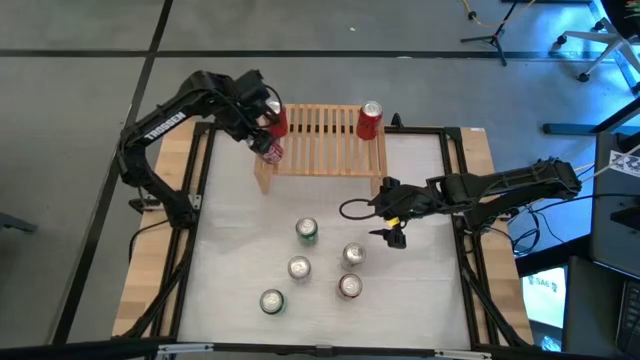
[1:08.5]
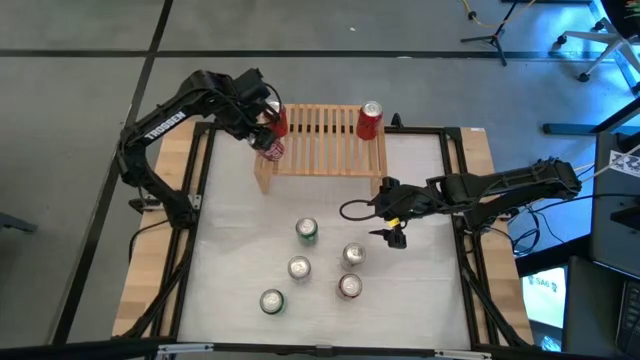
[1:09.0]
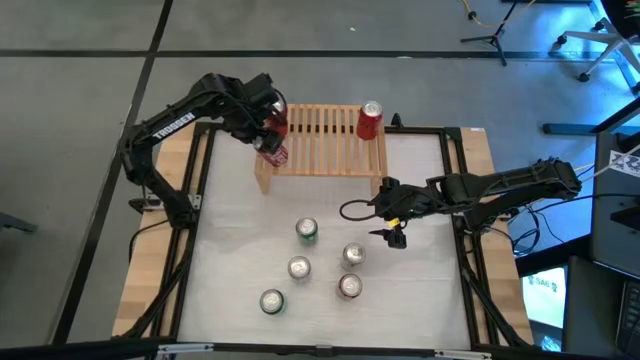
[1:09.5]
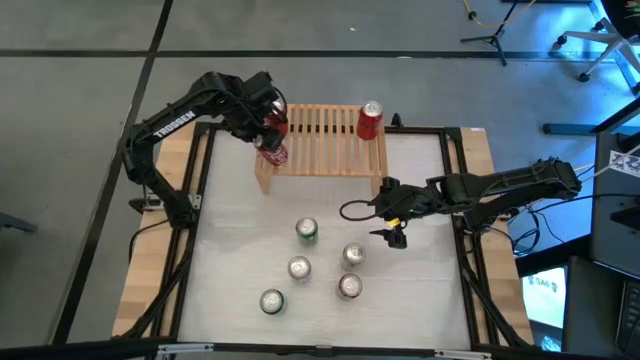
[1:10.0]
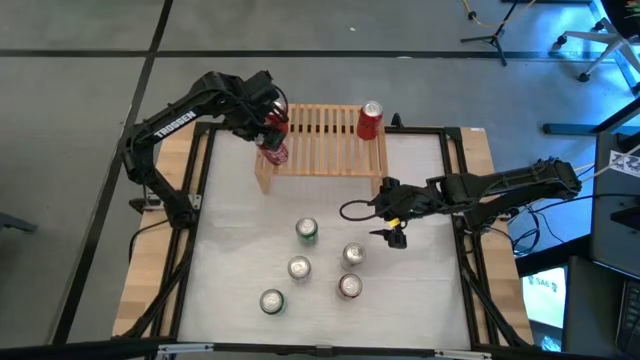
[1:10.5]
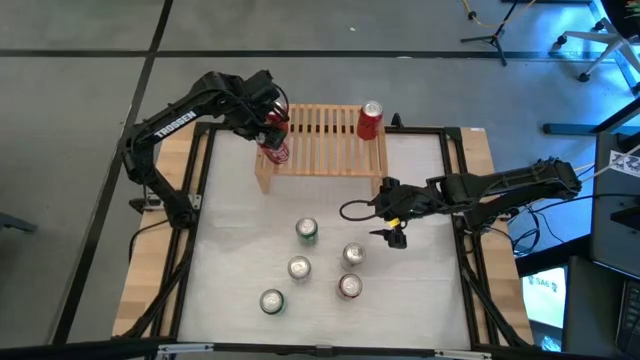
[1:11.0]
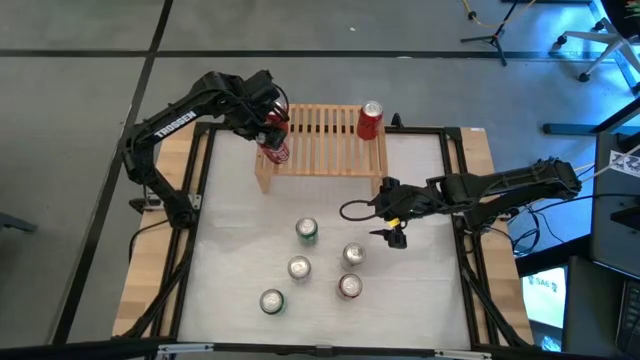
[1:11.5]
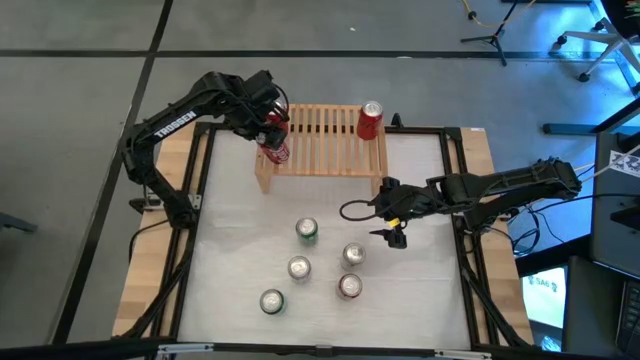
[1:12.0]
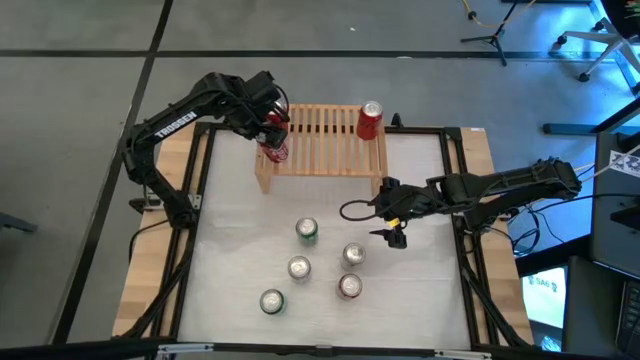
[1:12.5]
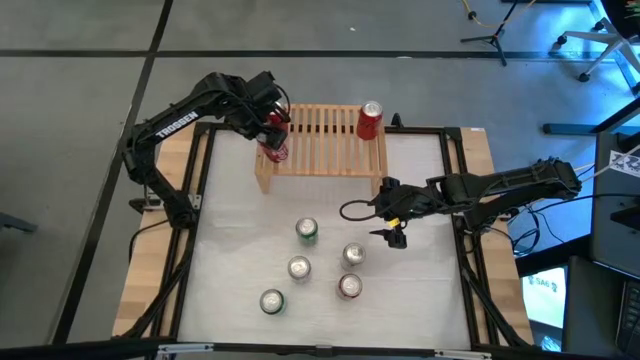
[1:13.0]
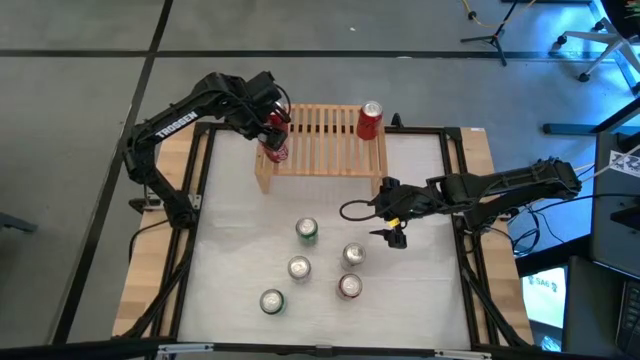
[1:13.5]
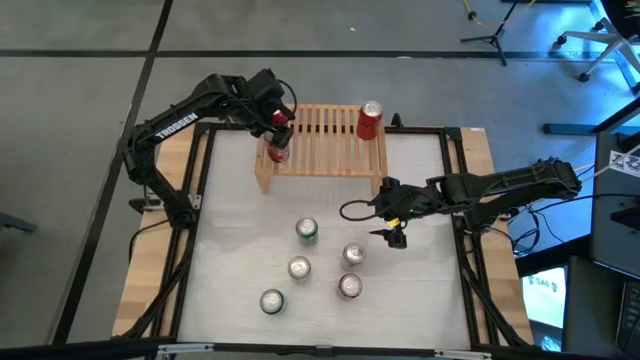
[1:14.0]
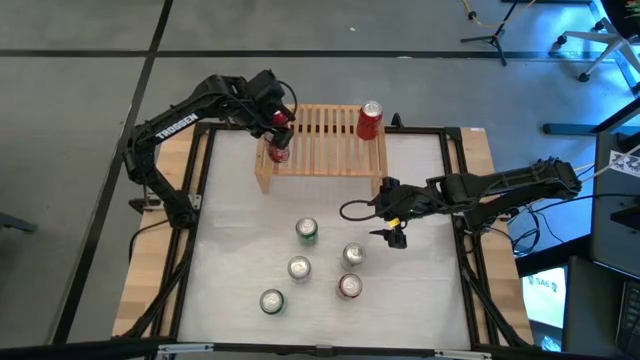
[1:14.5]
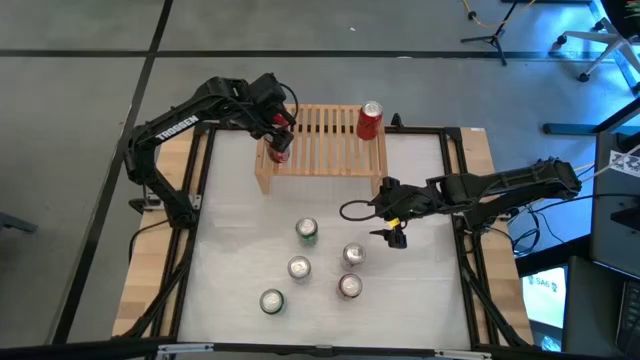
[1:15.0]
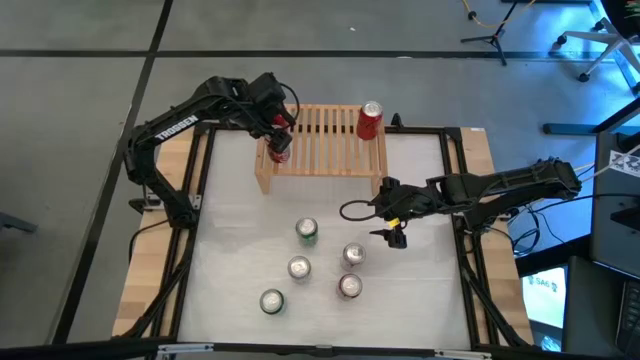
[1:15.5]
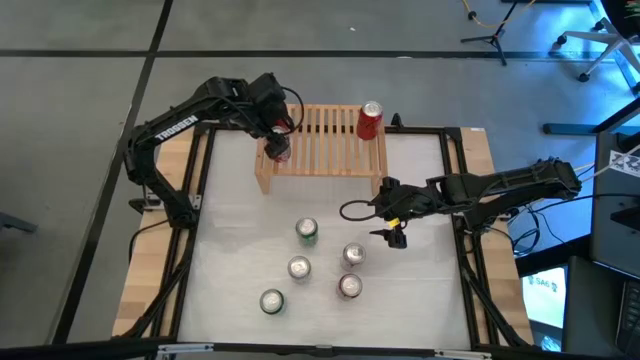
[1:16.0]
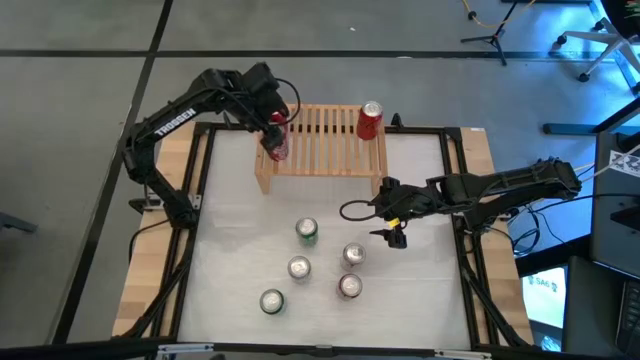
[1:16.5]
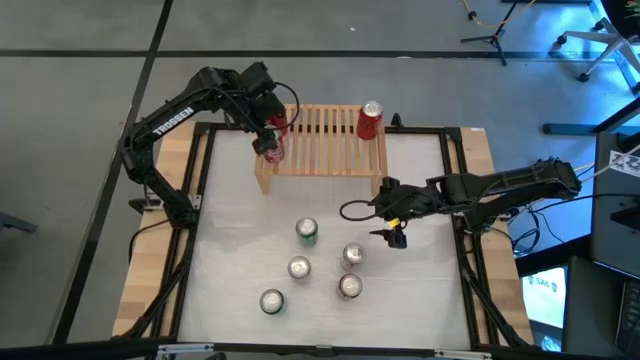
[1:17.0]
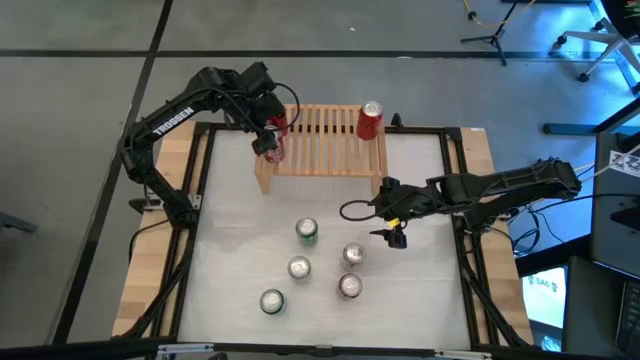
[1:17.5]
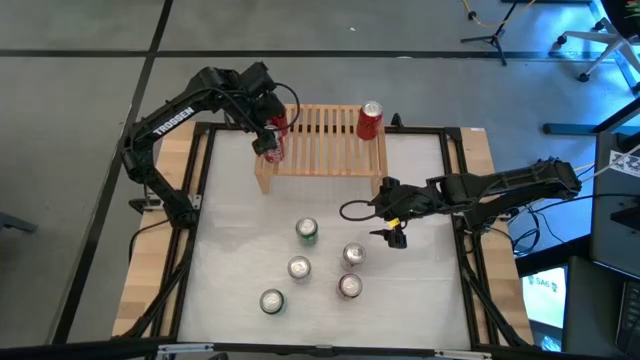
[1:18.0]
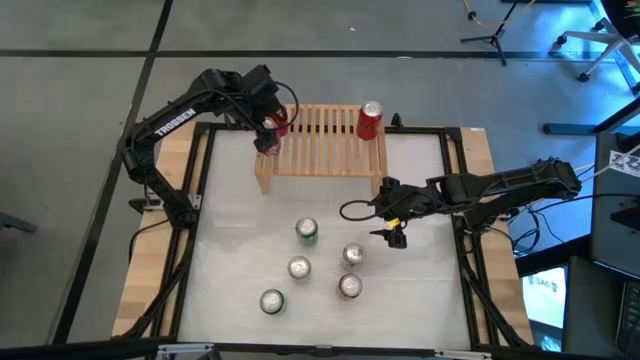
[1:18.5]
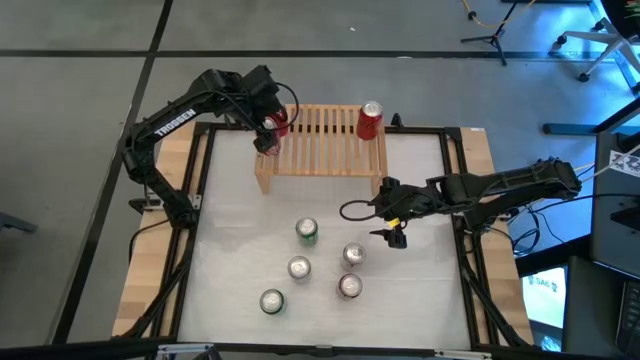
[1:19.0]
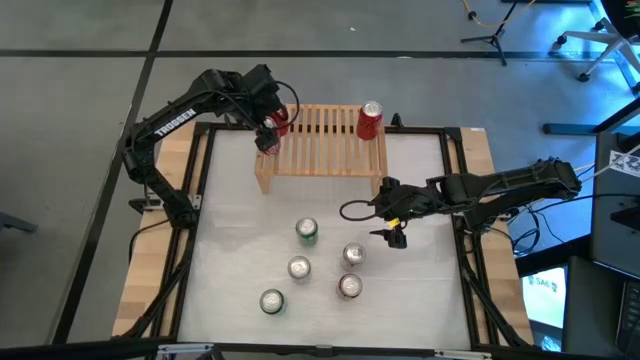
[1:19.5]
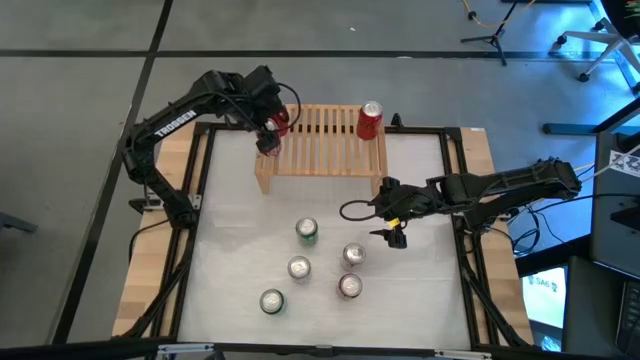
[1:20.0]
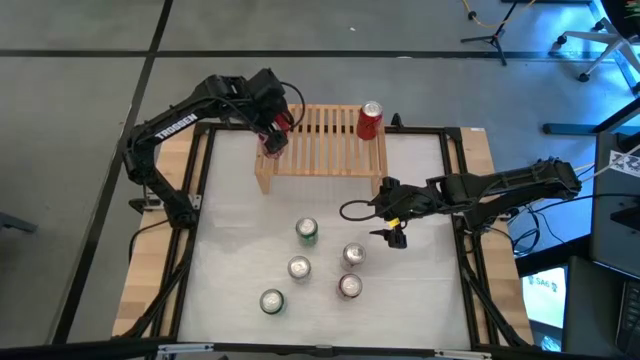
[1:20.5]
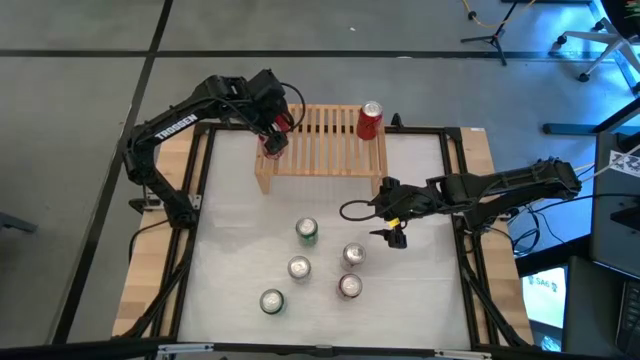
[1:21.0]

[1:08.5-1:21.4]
Task: Place canned beverage on shelf
Put the left red white soda can on the shelf

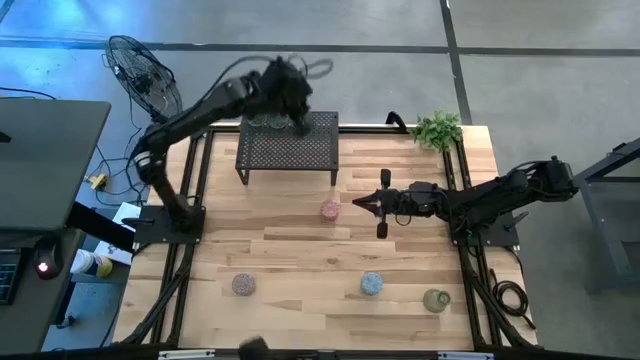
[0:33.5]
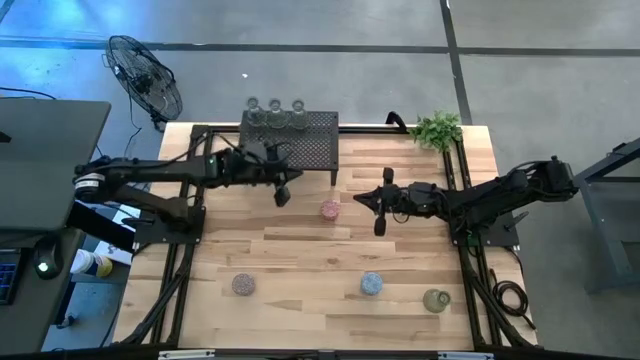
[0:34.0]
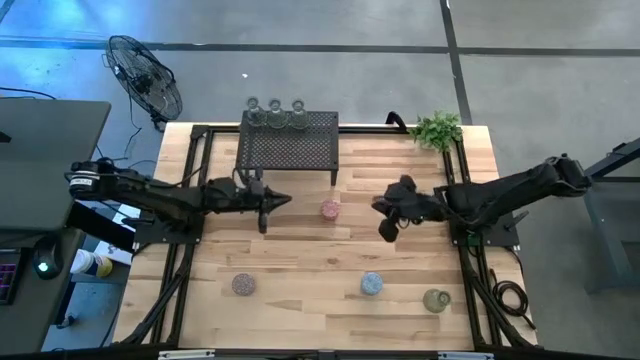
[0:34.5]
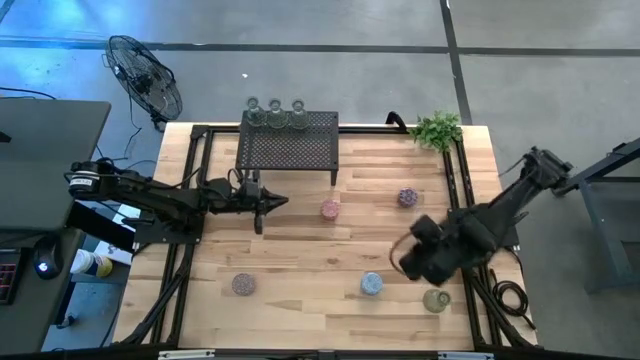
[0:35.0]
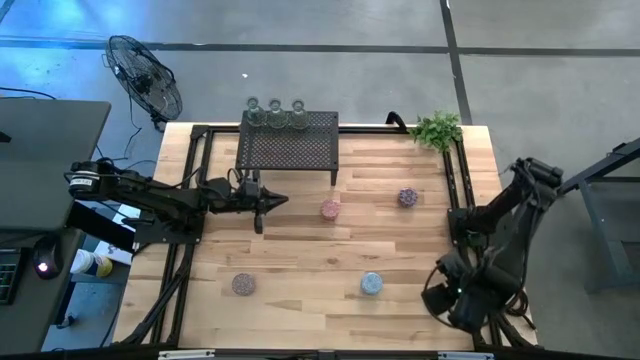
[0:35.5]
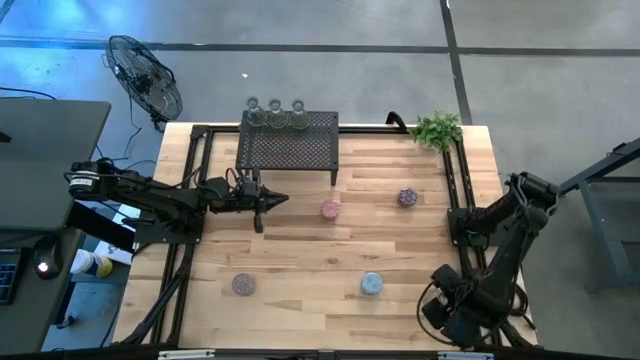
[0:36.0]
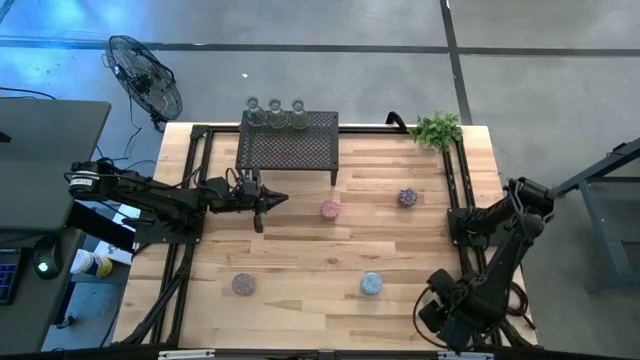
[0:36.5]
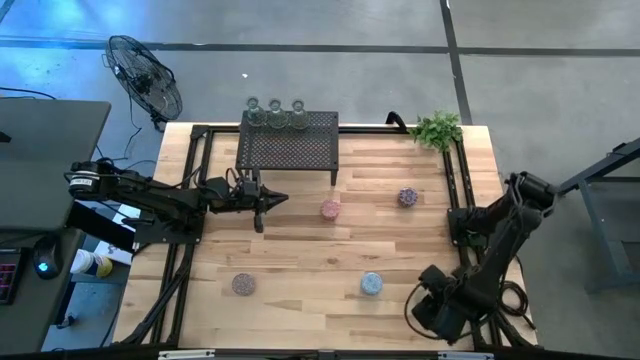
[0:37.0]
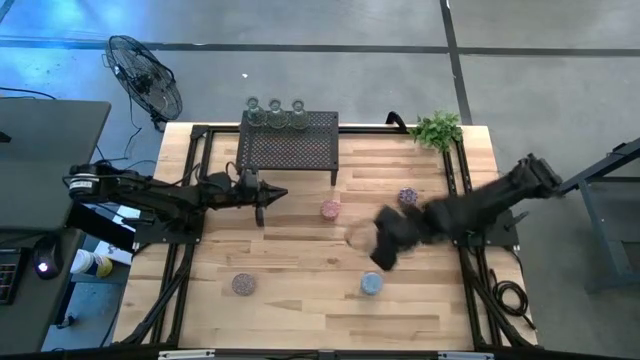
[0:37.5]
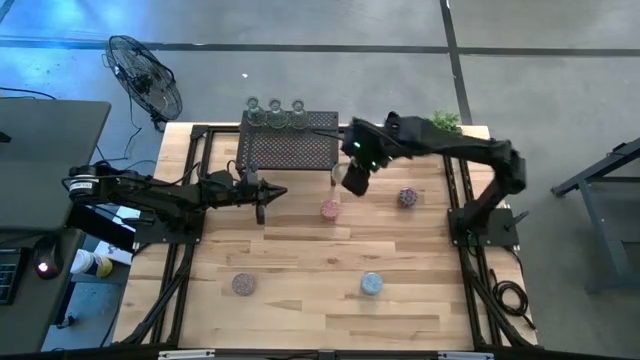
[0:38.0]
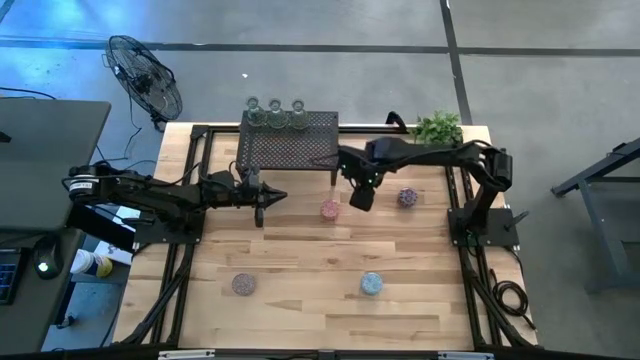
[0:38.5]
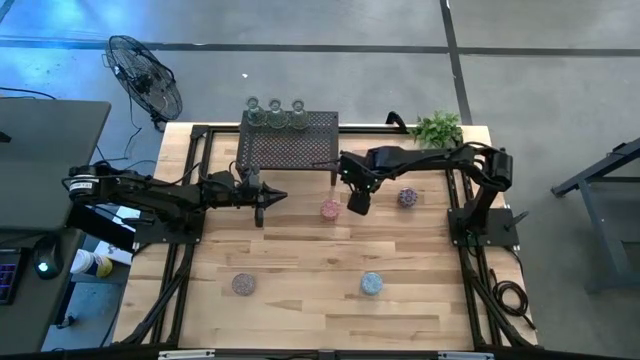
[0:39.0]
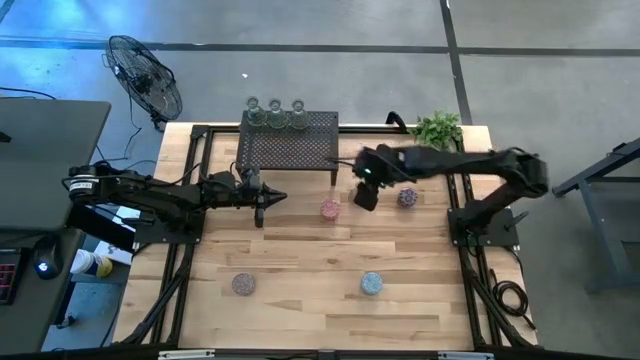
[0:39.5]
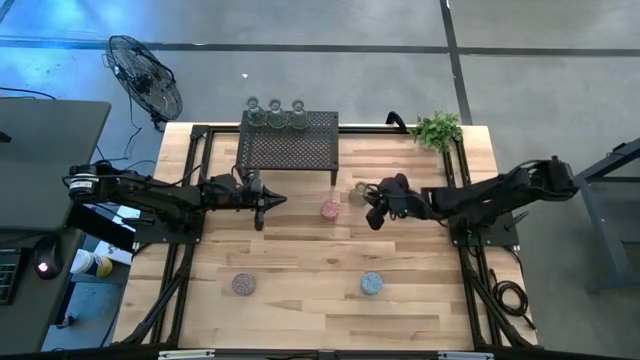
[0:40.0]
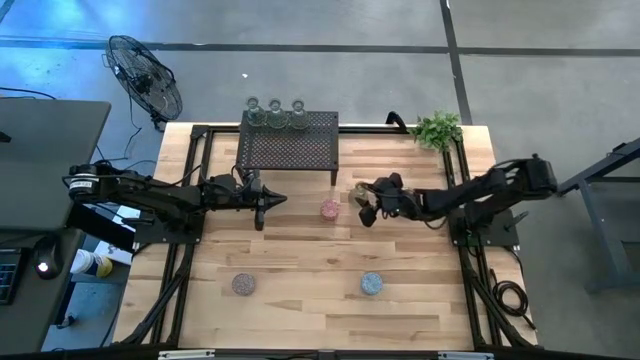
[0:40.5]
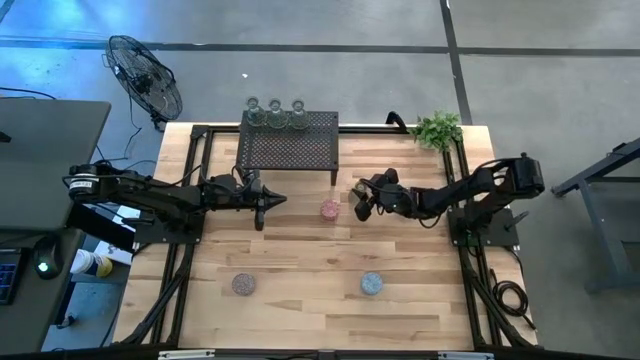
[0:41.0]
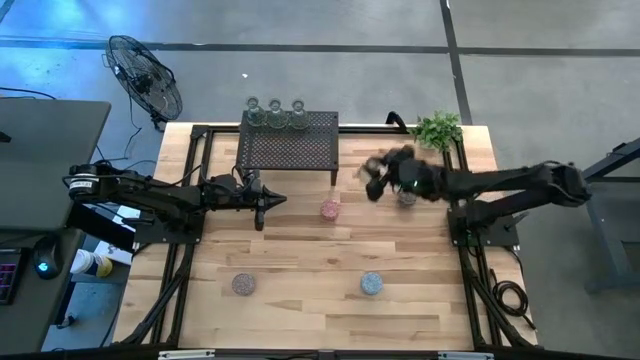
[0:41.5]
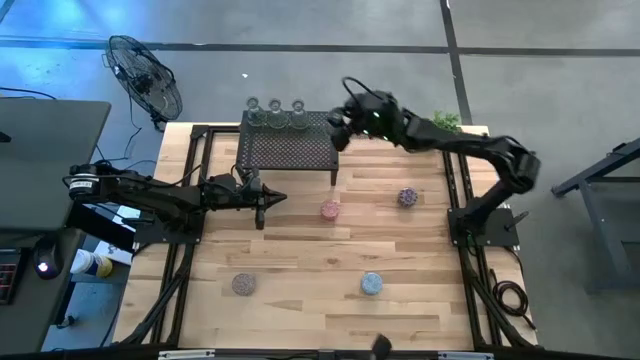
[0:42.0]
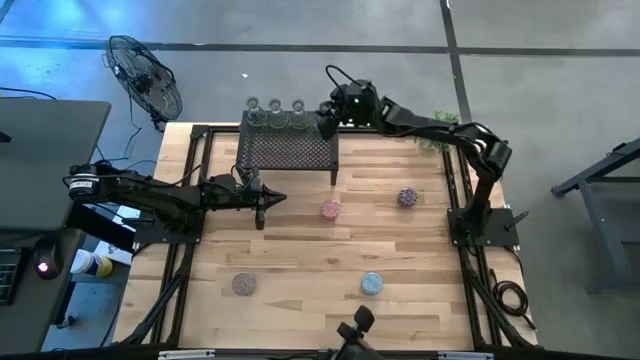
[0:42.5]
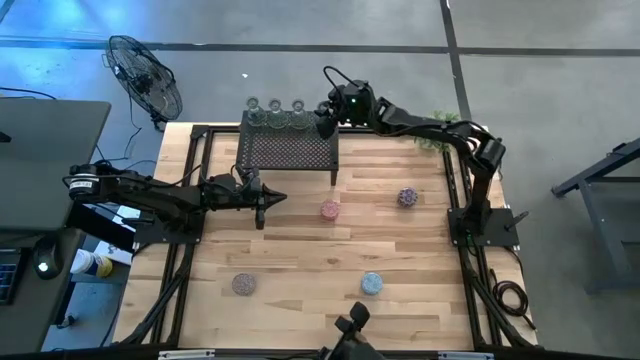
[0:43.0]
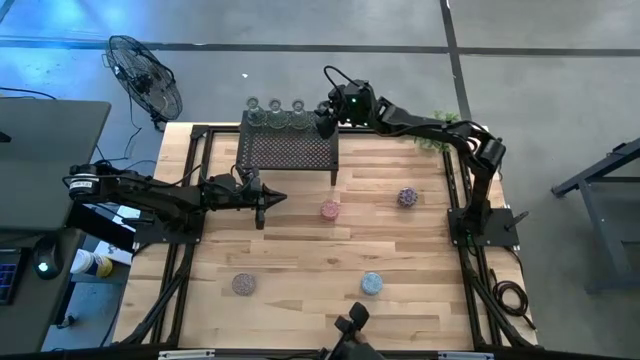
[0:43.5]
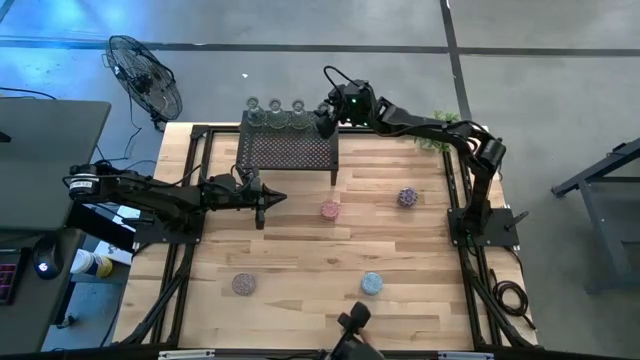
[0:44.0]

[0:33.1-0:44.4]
Task: Pick & Place candle stick holders
Put the green glass candle holder on the shelf
